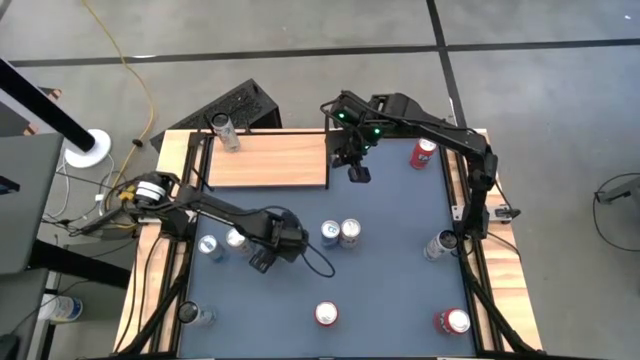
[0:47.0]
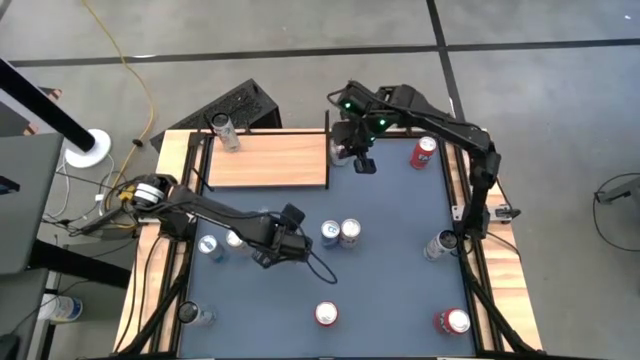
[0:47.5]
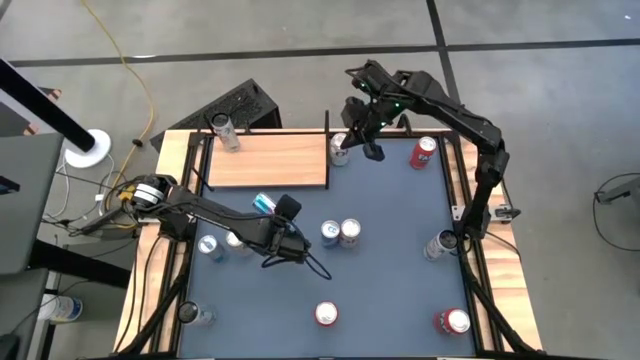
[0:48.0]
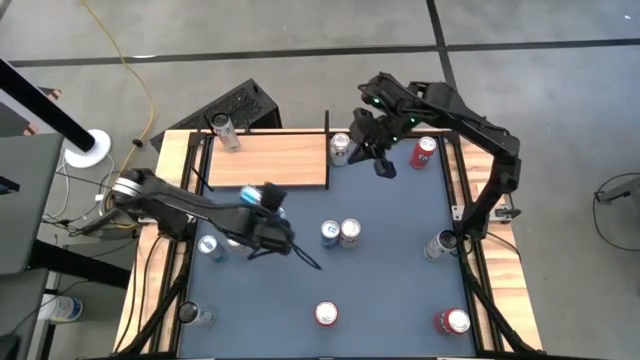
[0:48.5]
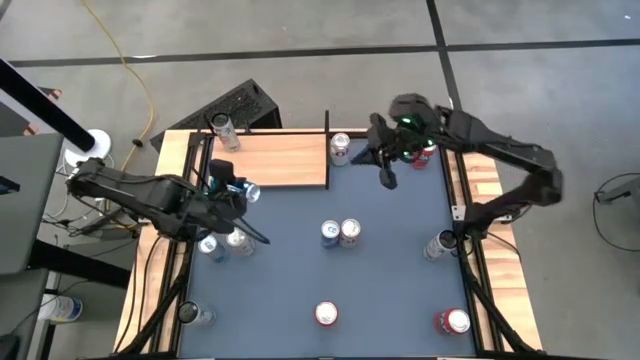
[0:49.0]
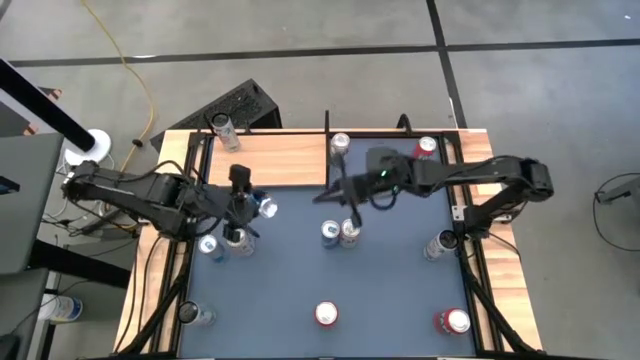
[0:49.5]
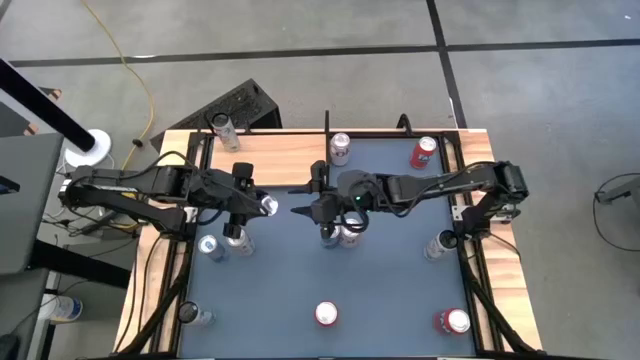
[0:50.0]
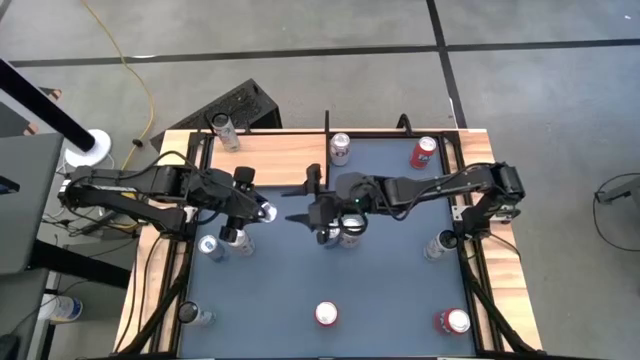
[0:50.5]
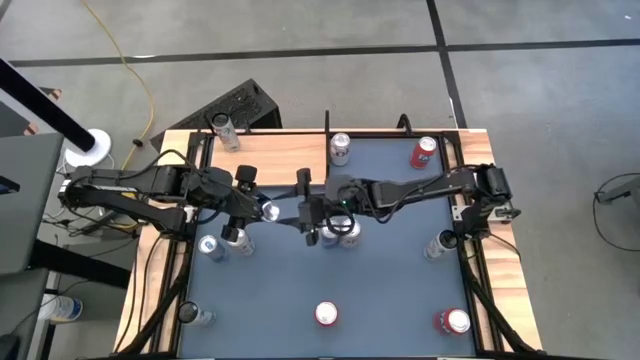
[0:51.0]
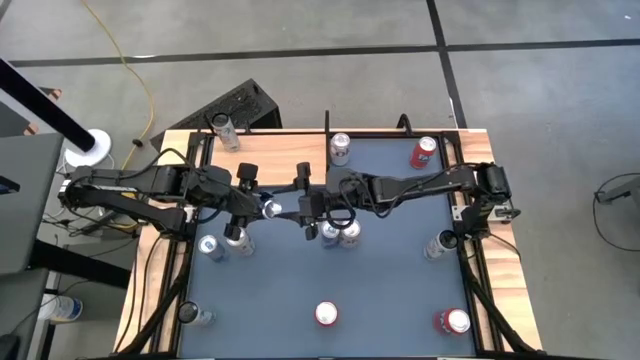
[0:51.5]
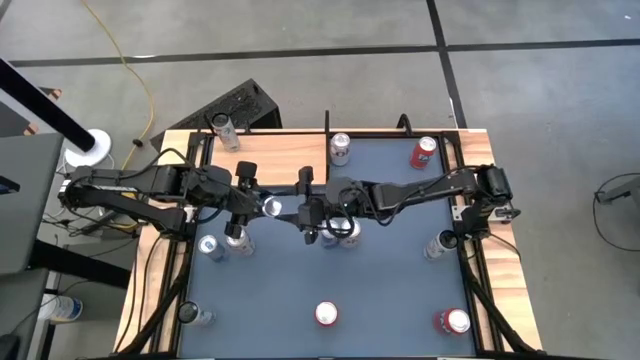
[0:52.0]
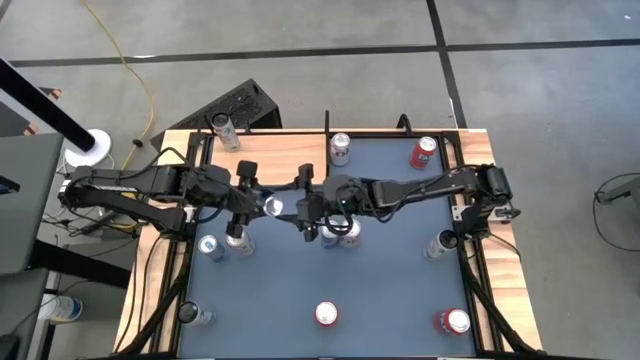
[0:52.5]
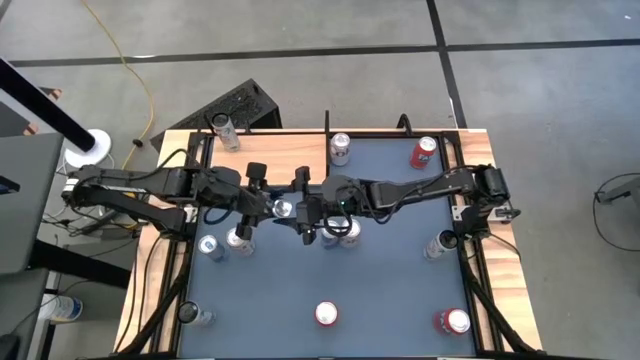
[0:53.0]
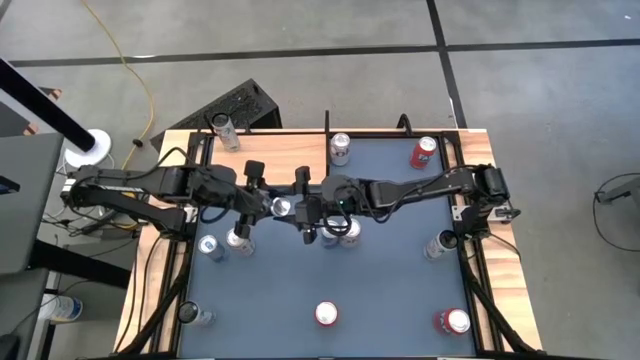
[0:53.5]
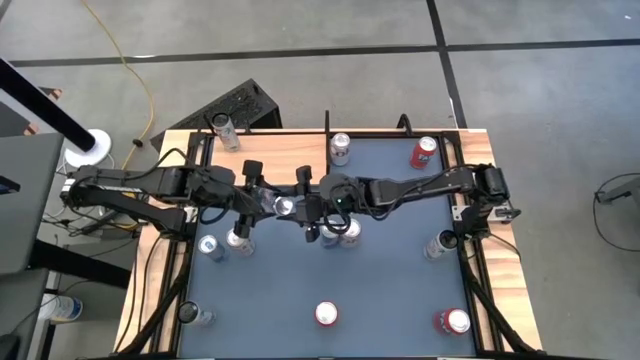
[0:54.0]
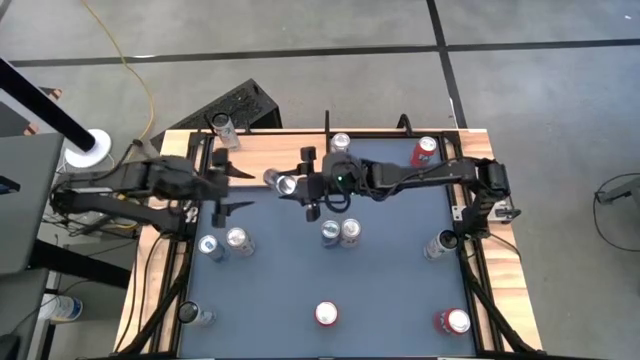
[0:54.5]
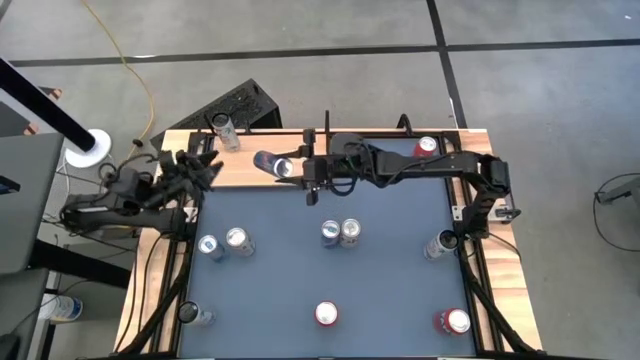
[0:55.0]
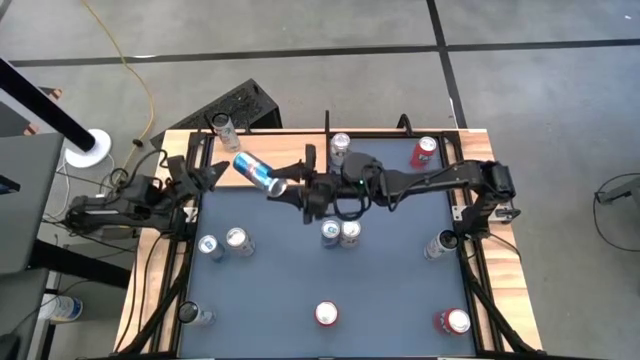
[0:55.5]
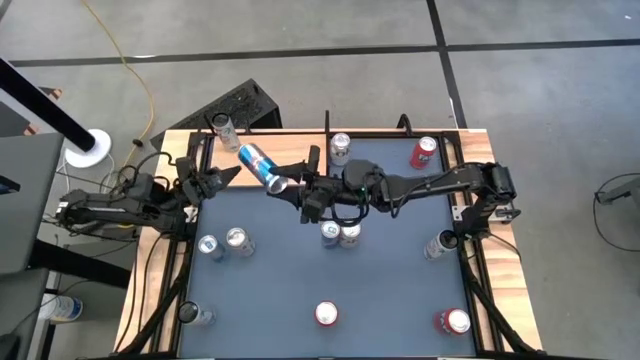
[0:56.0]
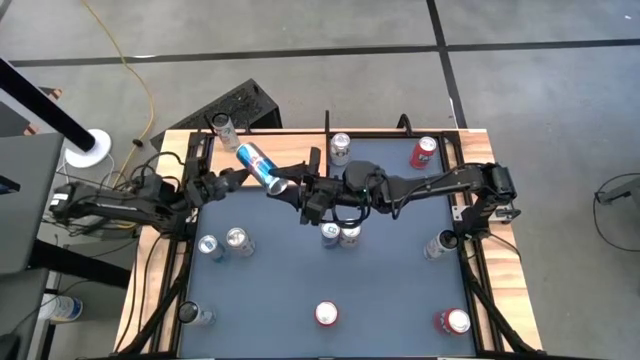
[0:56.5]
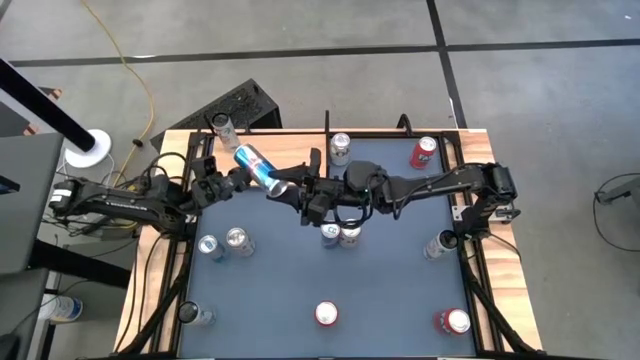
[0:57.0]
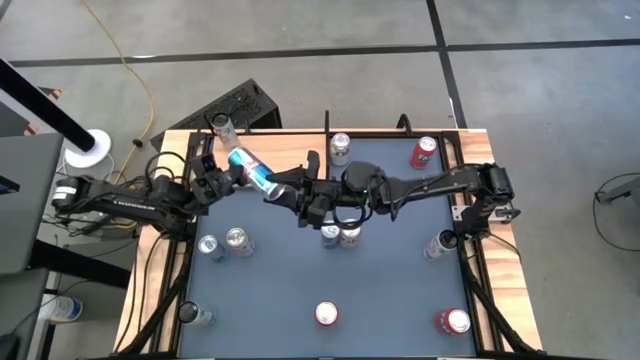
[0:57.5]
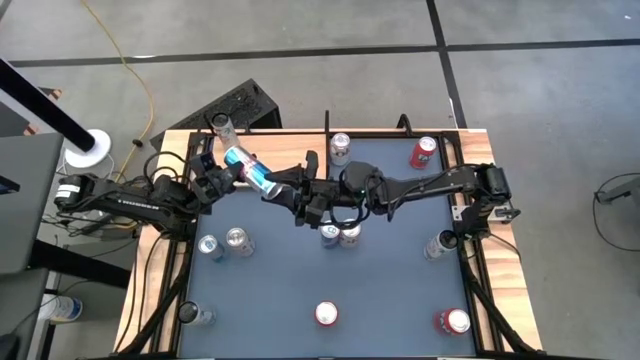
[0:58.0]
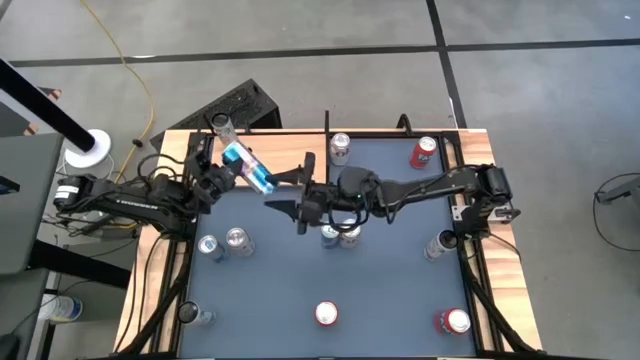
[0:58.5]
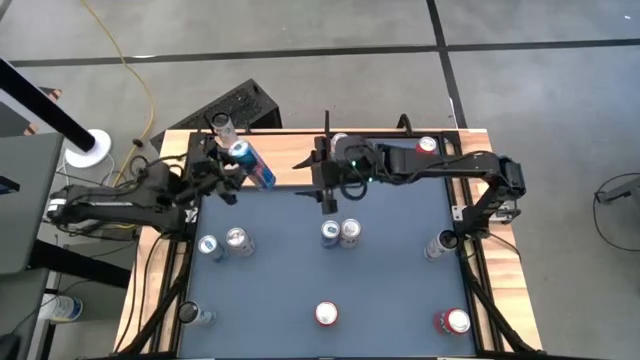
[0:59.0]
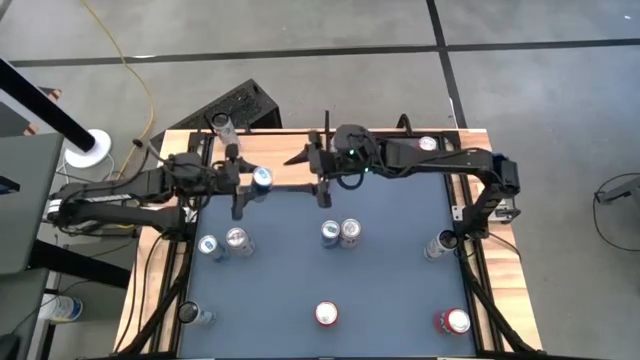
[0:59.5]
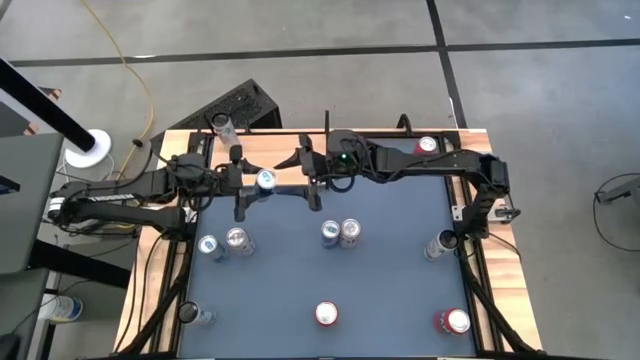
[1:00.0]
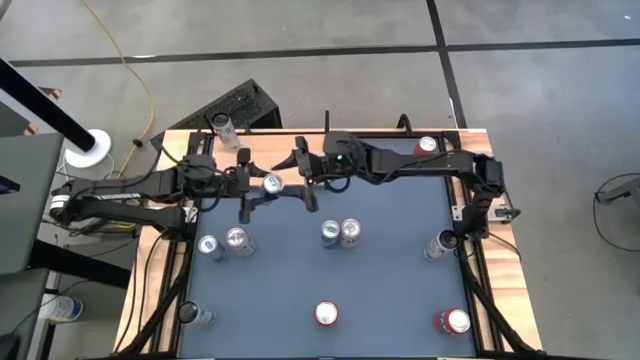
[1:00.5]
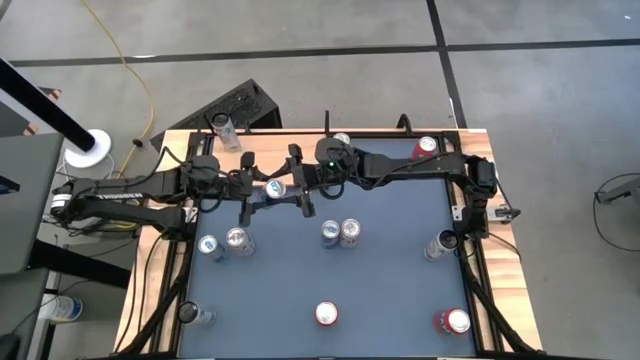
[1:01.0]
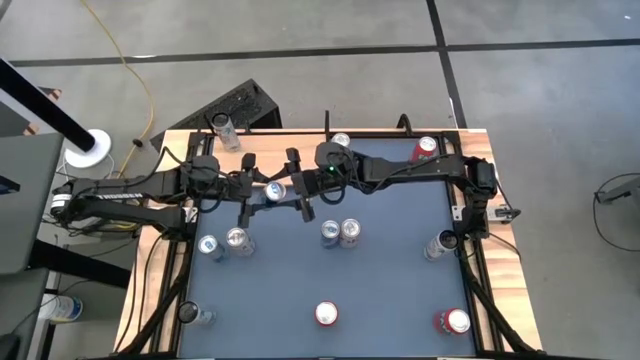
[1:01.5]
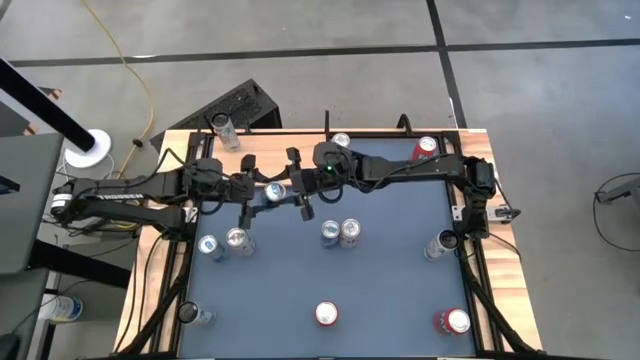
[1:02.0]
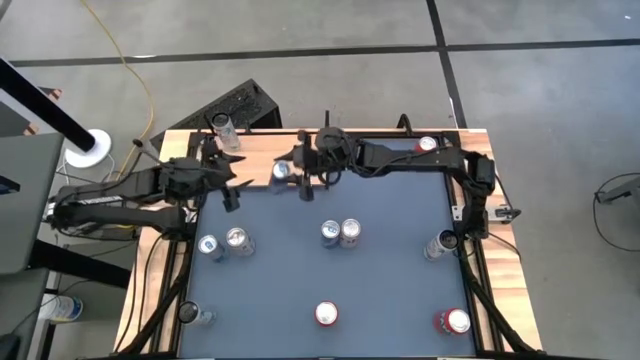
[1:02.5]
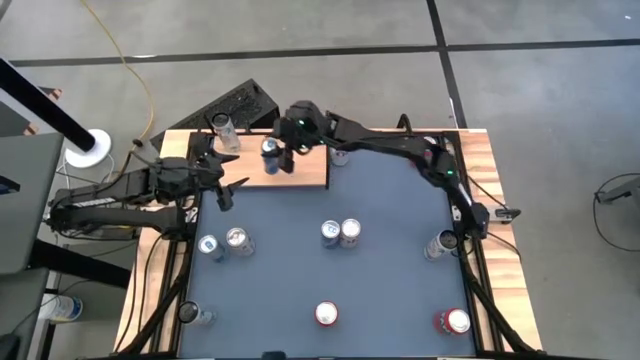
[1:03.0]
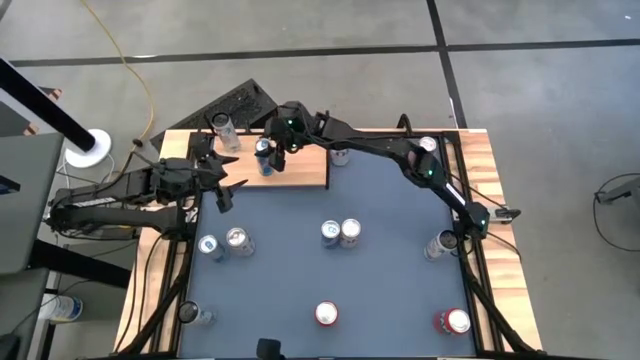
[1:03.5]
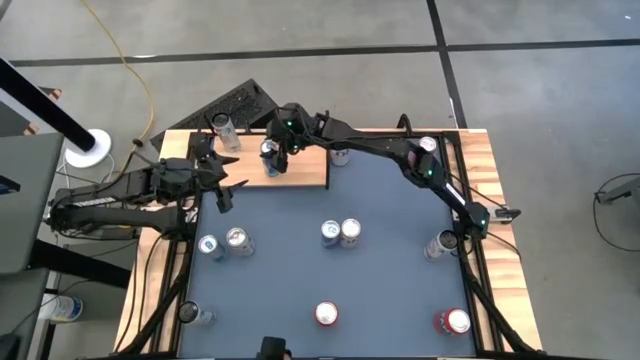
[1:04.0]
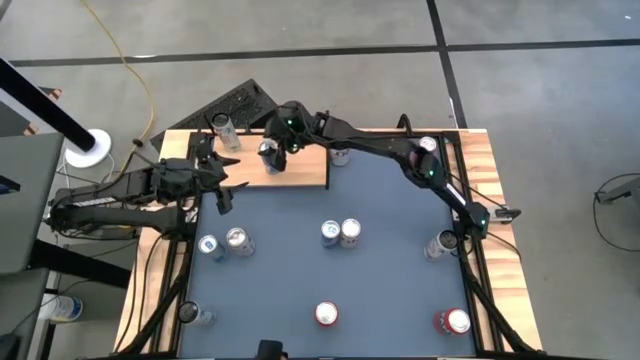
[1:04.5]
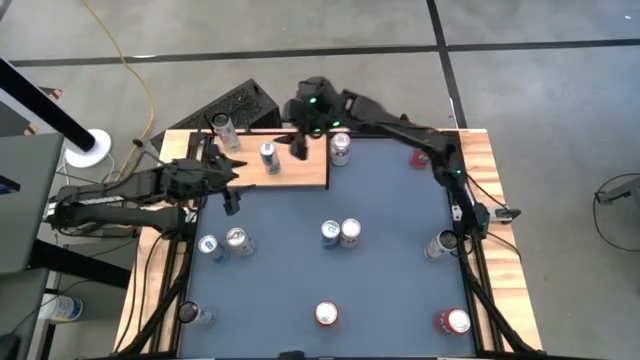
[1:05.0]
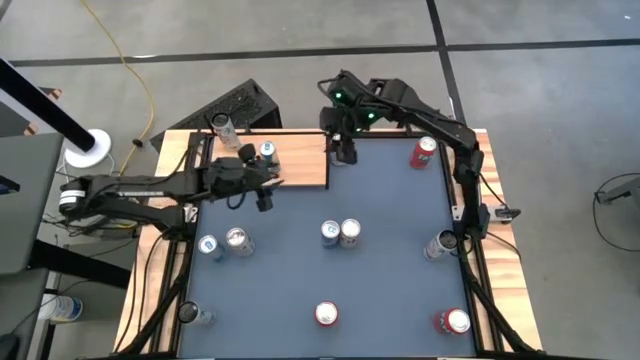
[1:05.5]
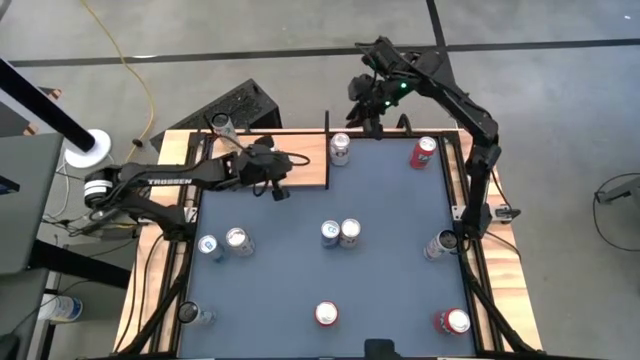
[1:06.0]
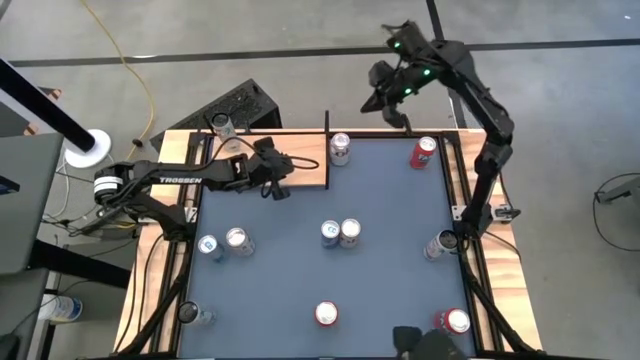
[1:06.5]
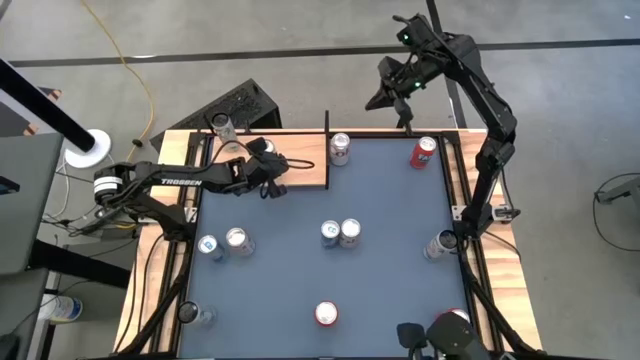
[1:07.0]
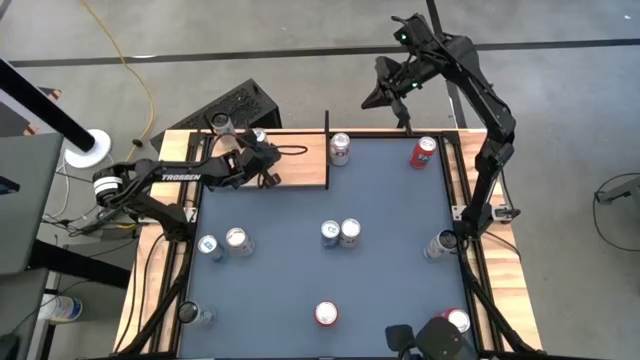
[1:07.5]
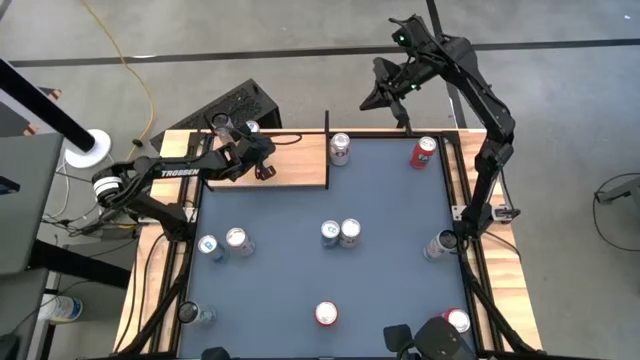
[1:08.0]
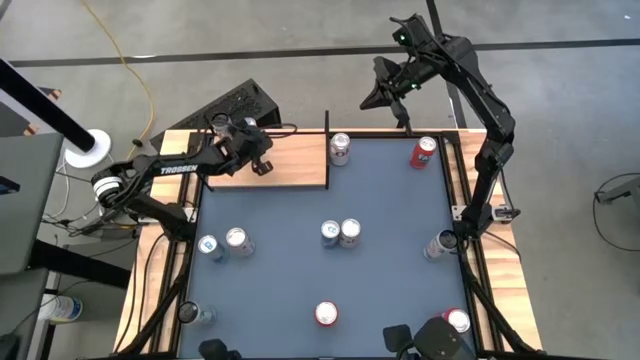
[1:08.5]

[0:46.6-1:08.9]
Task: Place canned beverage on shelf
Put the middle blue soda can on the shelf
